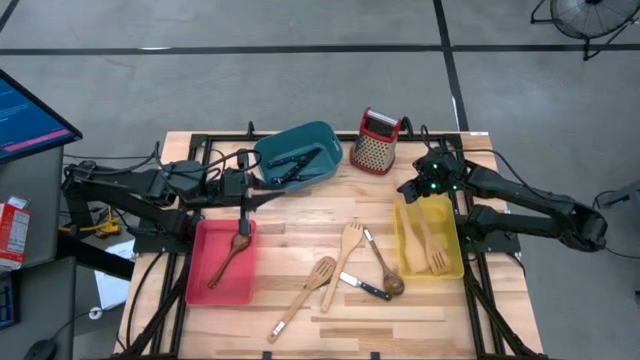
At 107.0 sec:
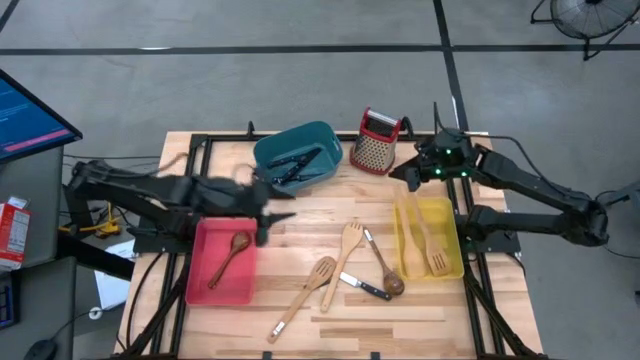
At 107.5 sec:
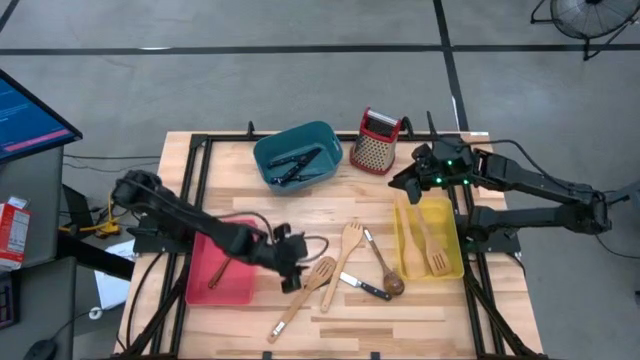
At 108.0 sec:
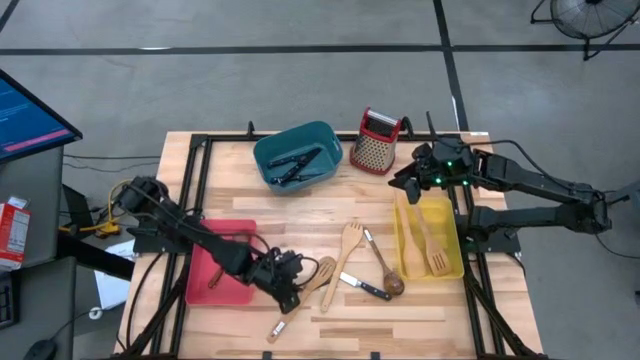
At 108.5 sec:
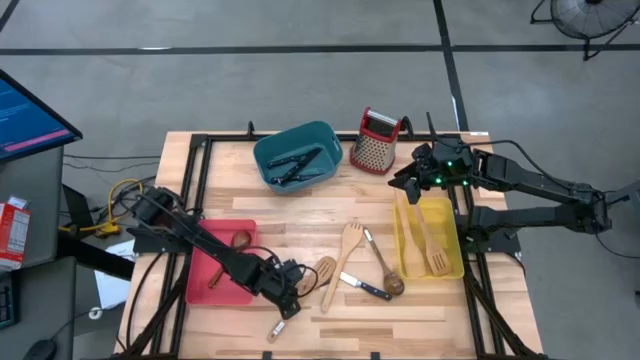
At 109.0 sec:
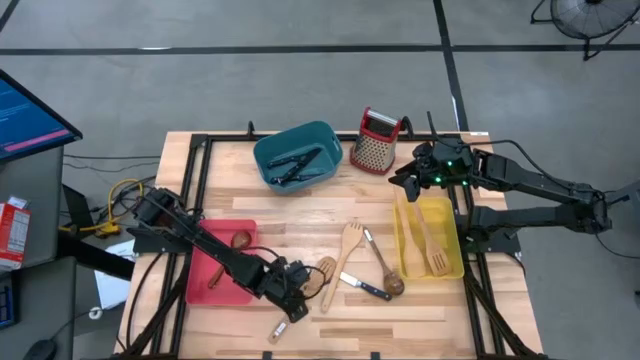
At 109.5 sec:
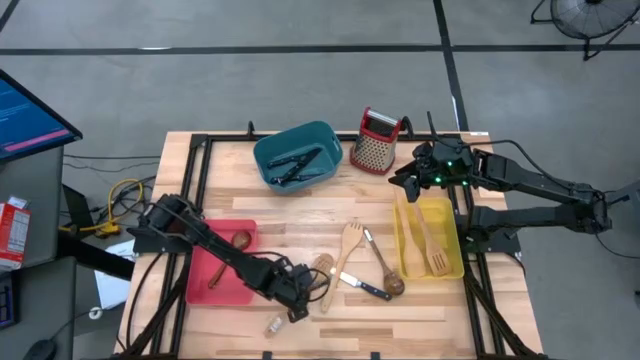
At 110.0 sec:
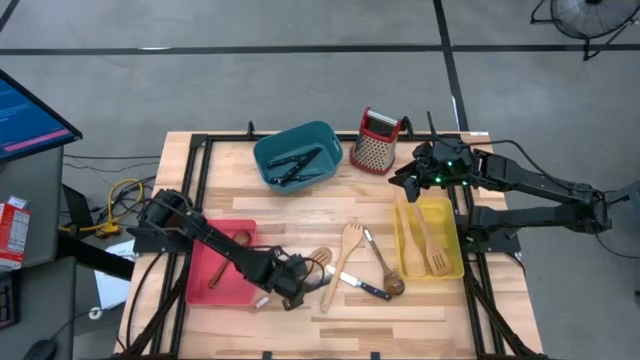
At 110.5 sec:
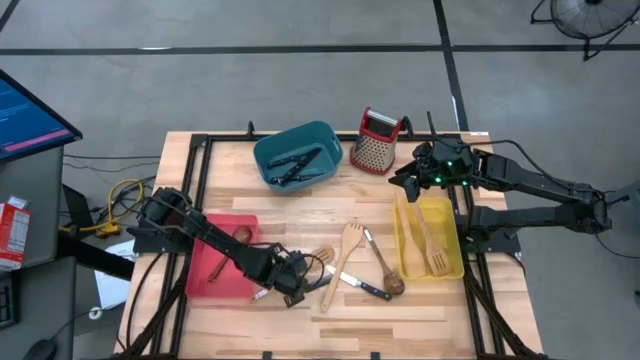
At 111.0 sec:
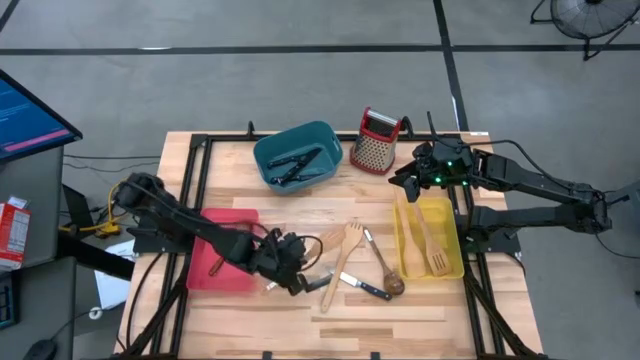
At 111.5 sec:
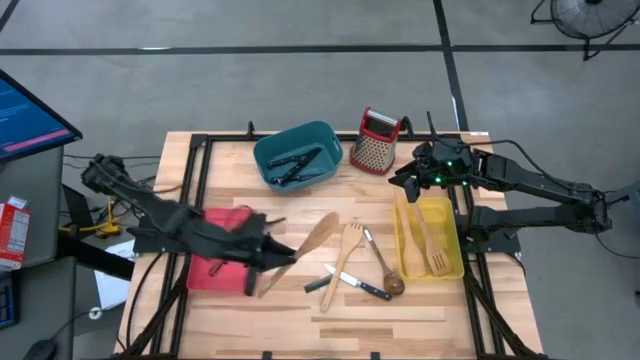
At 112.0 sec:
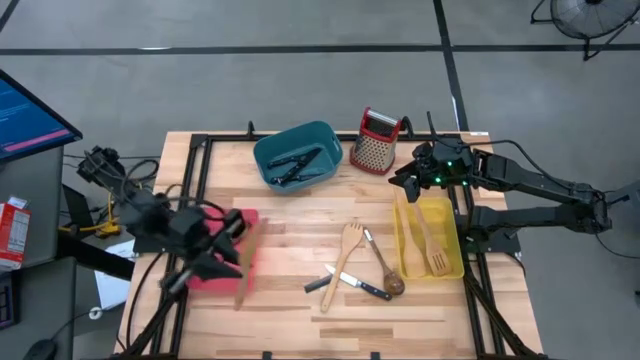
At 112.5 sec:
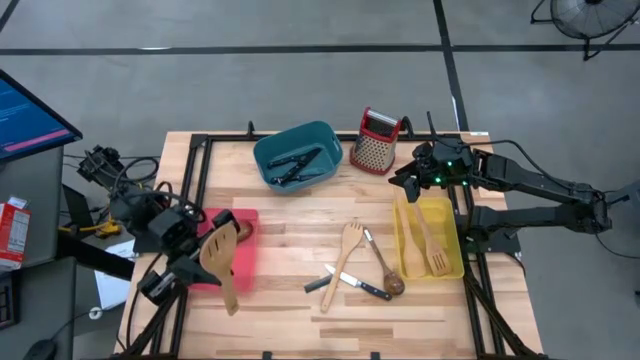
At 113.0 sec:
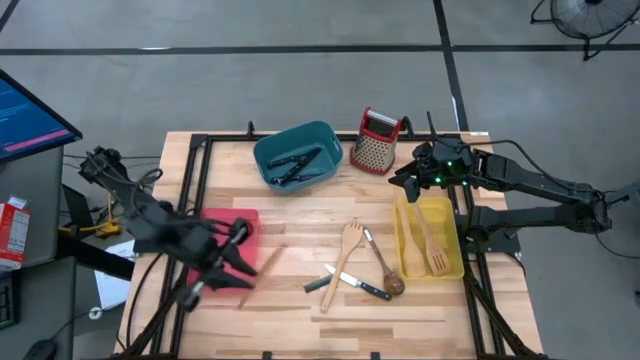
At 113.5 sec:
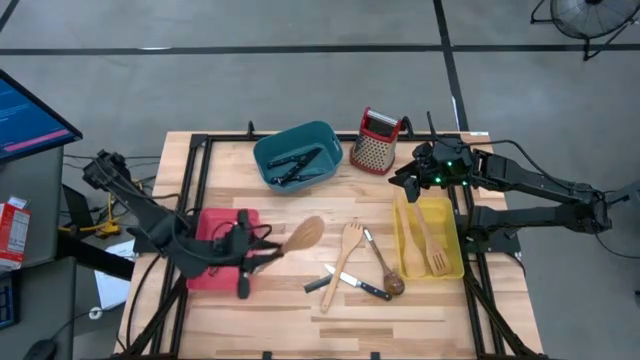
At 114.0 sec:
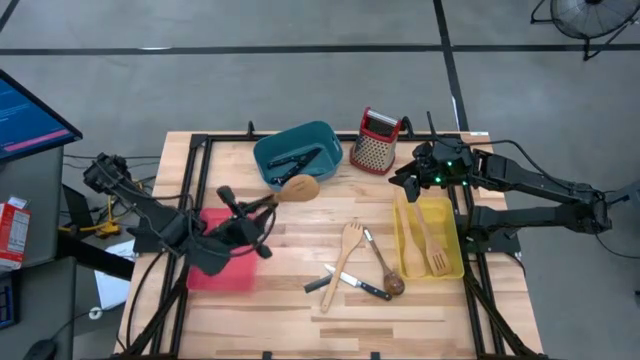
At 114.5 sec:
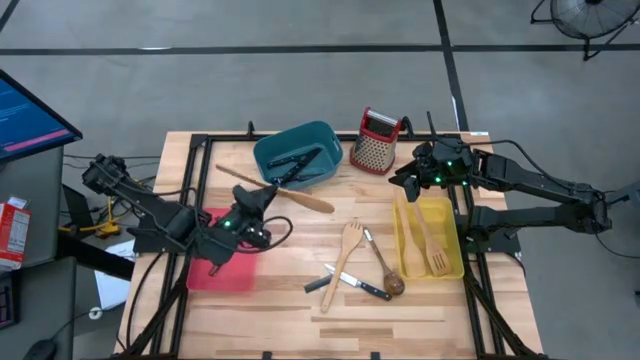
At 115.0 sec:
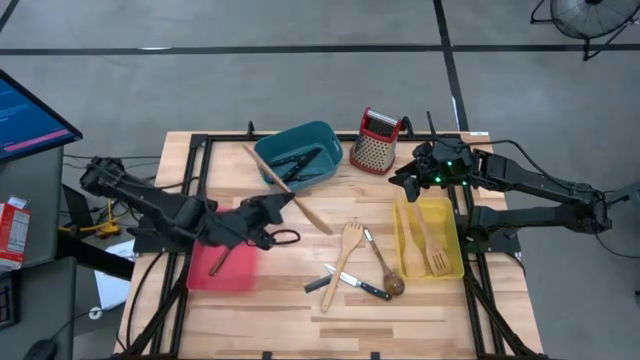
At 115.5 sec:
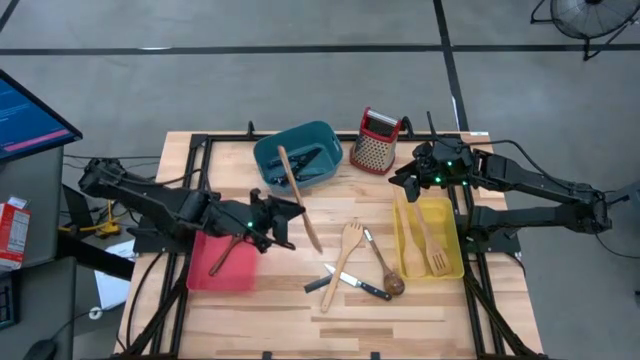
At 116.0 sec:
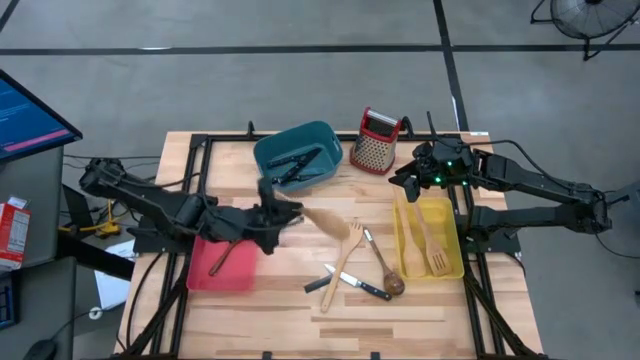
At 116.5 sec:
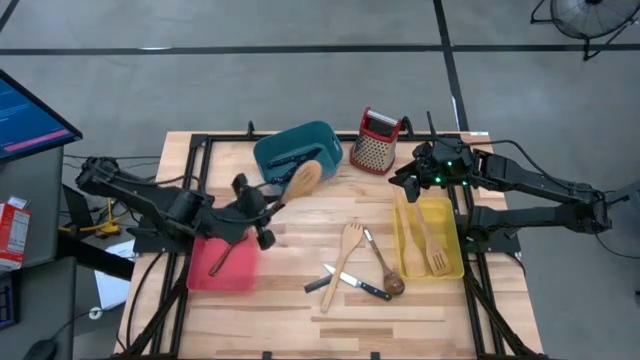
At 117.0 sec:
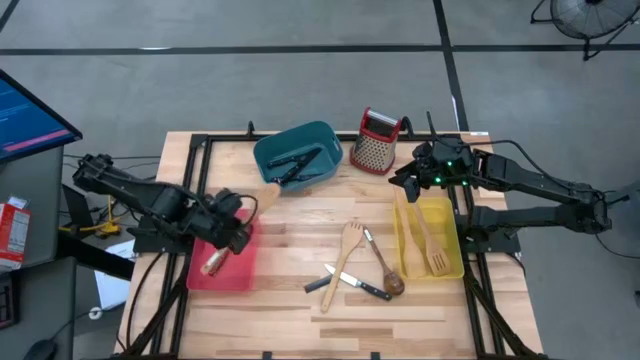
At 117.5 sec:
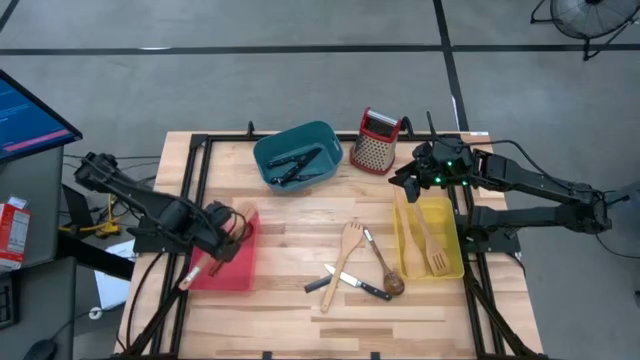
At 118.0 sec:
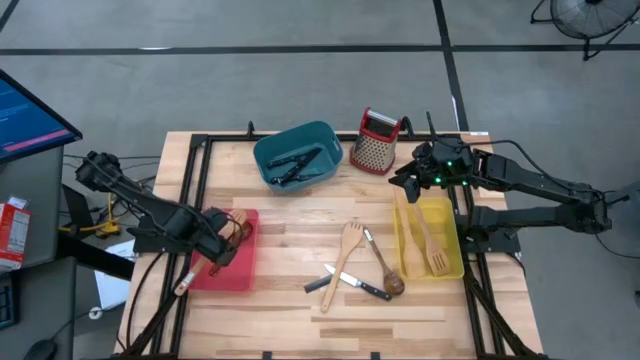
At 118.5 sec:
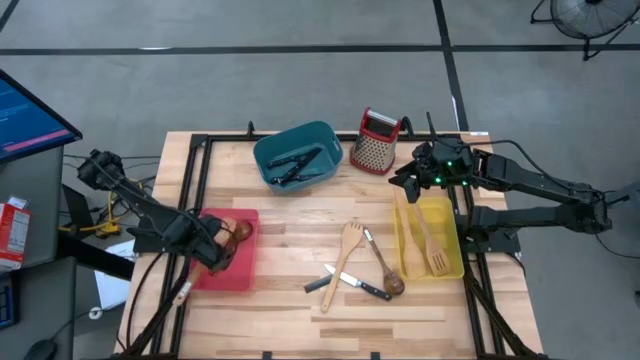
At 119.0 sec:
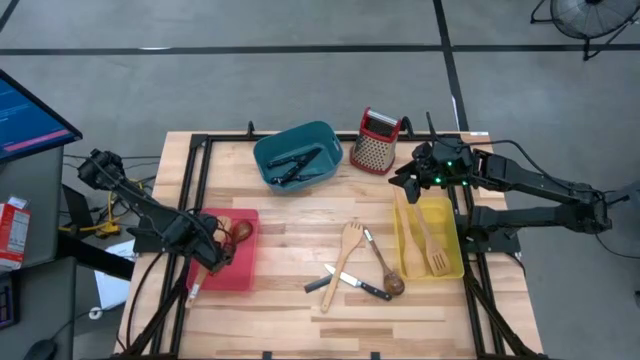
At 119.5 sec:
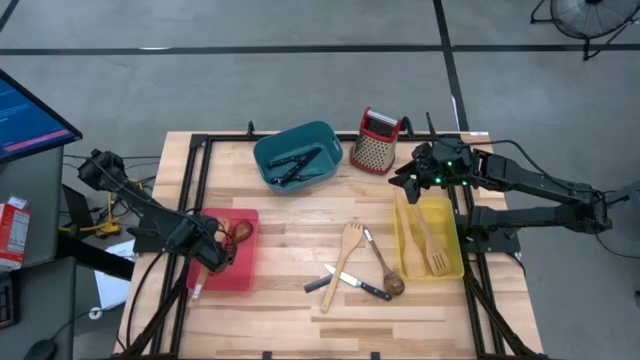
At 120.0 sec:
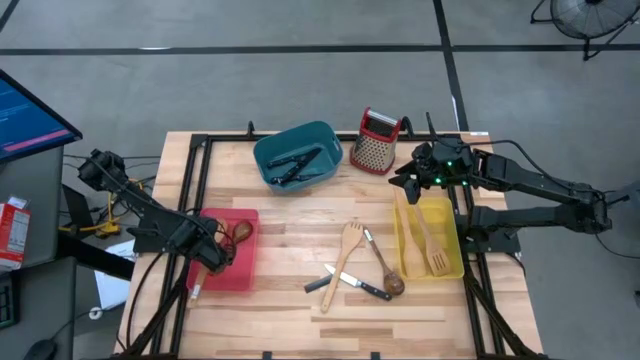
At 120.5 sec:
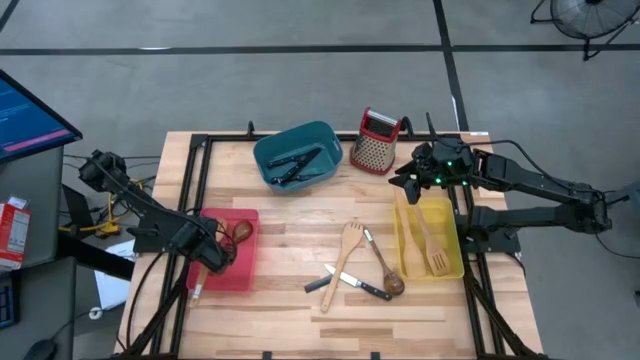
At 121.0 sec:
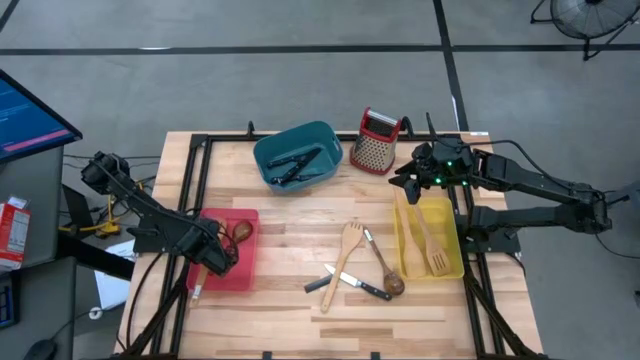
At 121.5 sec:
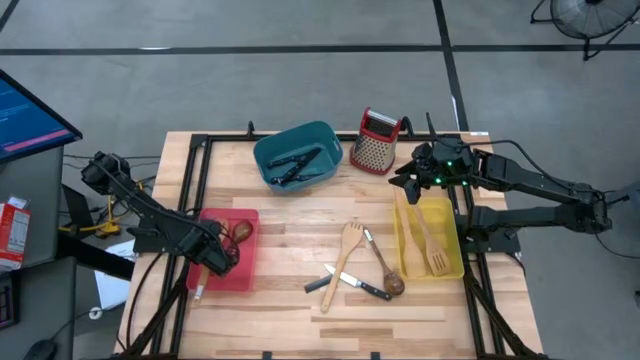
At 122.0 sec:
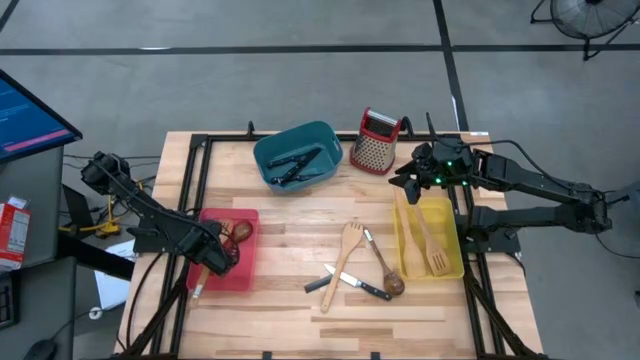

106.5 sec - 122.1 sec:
Task: Pick & Place Kitchen Items
Put the brown serving spoon into the pink bin
